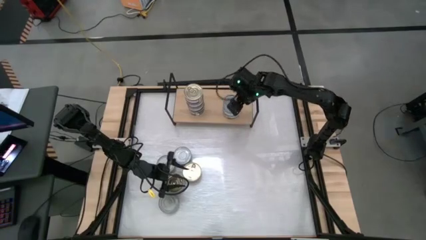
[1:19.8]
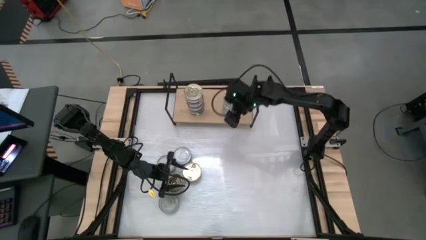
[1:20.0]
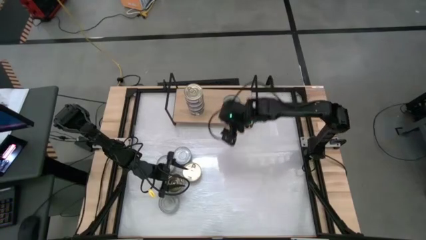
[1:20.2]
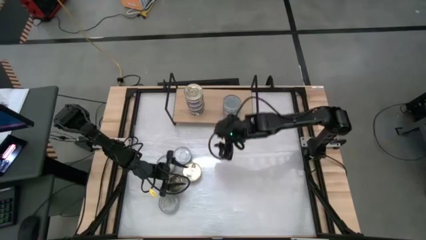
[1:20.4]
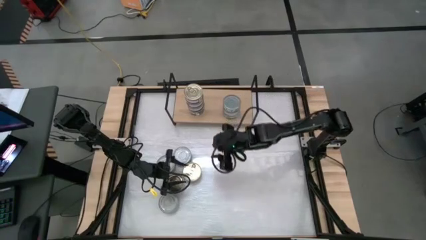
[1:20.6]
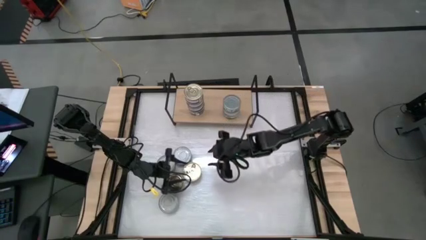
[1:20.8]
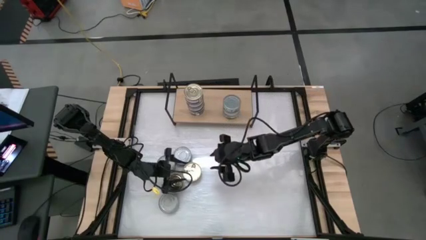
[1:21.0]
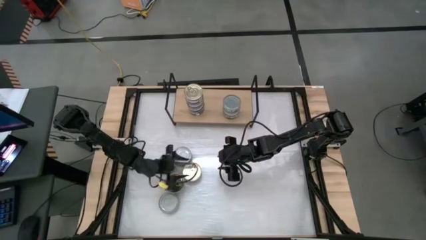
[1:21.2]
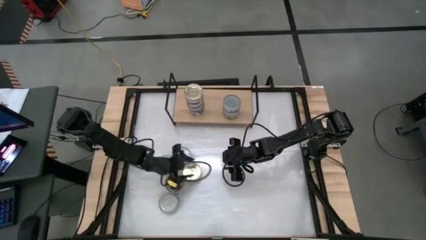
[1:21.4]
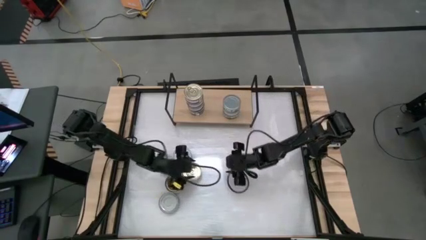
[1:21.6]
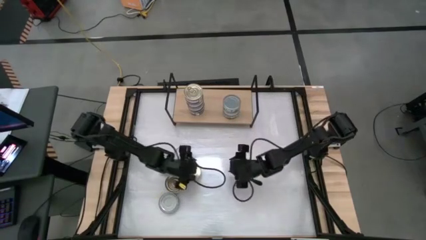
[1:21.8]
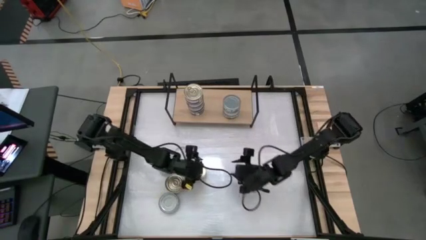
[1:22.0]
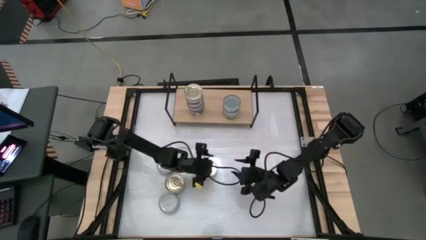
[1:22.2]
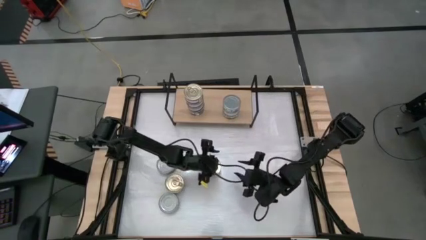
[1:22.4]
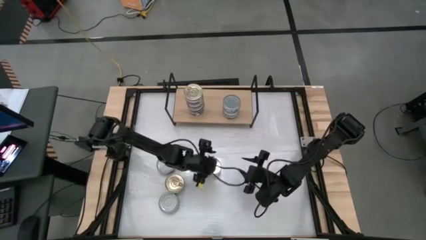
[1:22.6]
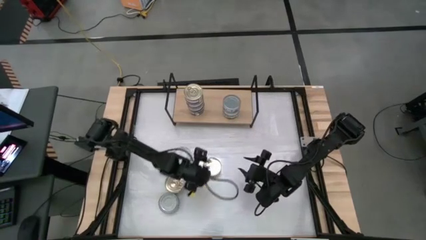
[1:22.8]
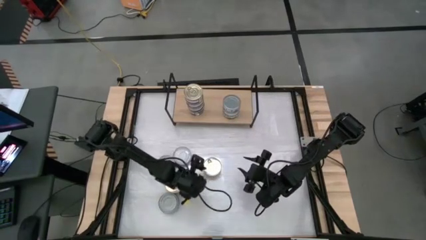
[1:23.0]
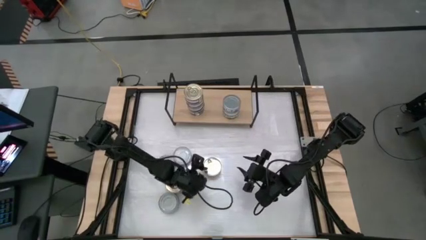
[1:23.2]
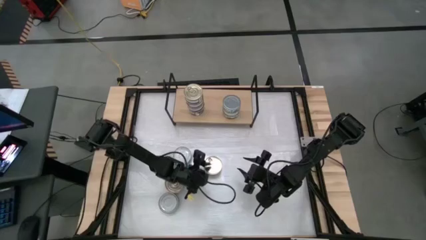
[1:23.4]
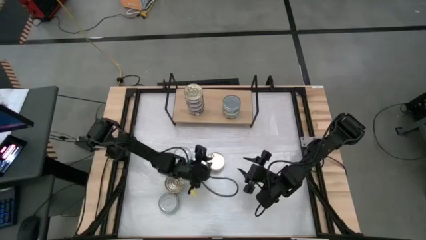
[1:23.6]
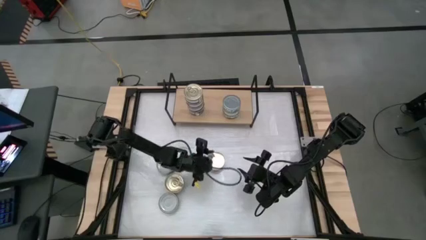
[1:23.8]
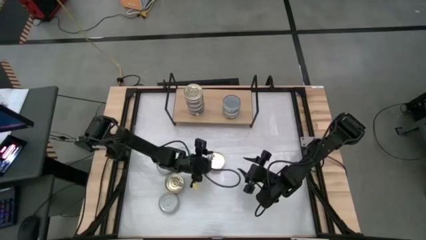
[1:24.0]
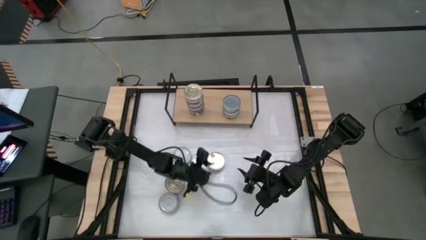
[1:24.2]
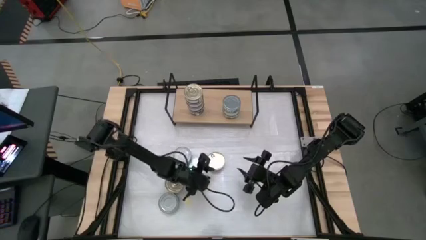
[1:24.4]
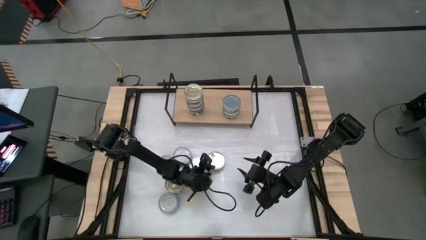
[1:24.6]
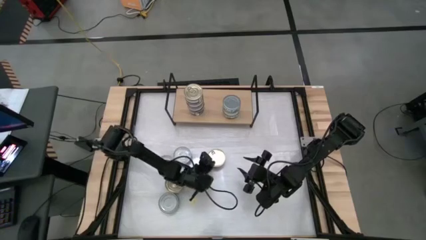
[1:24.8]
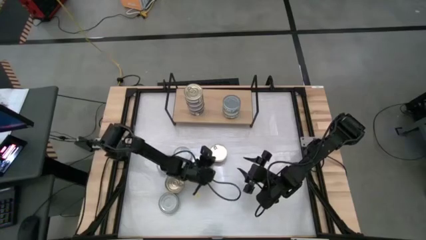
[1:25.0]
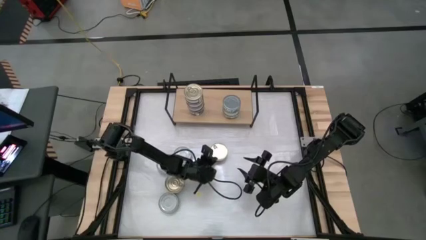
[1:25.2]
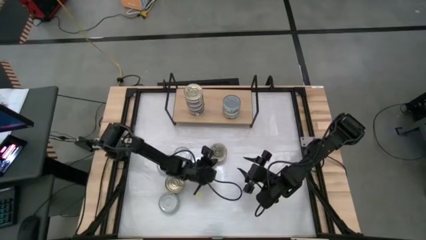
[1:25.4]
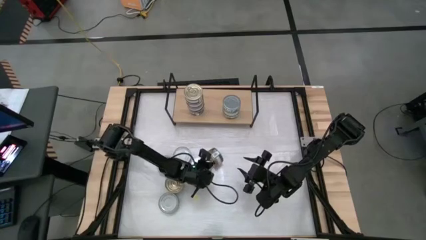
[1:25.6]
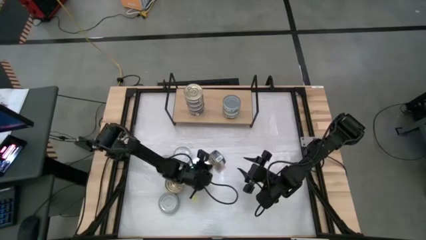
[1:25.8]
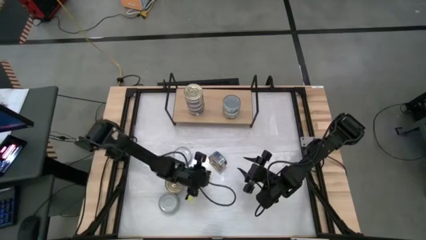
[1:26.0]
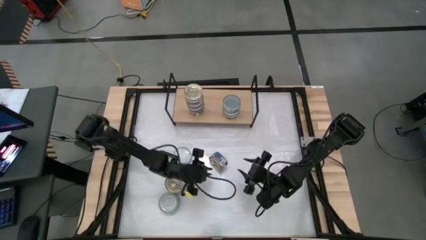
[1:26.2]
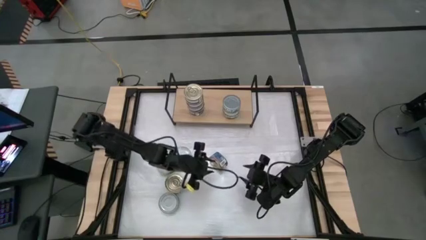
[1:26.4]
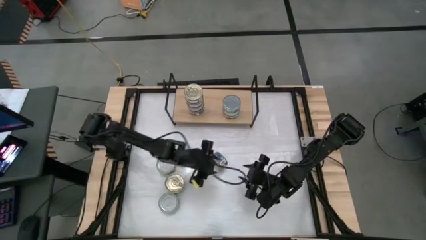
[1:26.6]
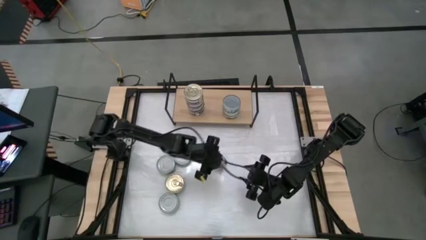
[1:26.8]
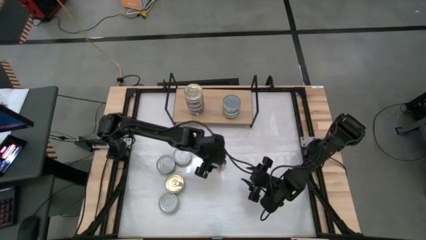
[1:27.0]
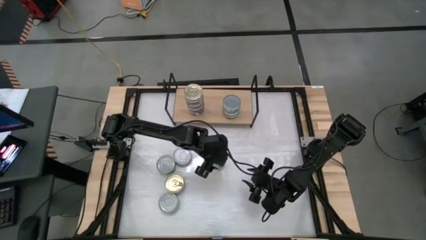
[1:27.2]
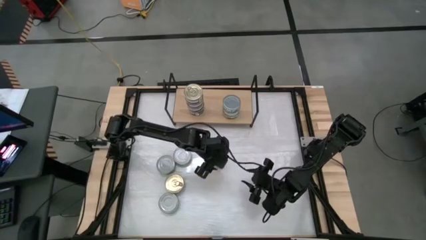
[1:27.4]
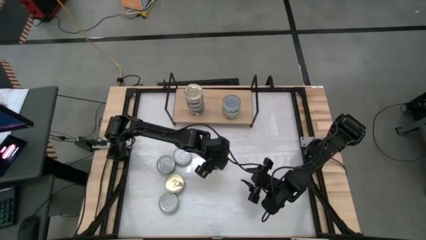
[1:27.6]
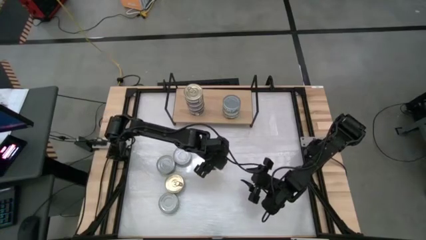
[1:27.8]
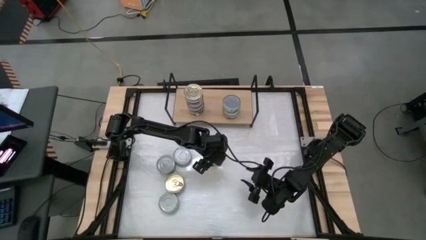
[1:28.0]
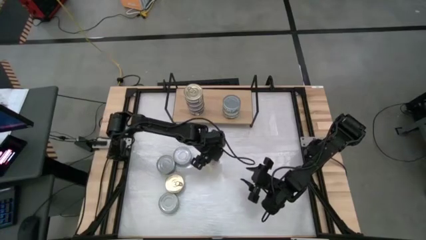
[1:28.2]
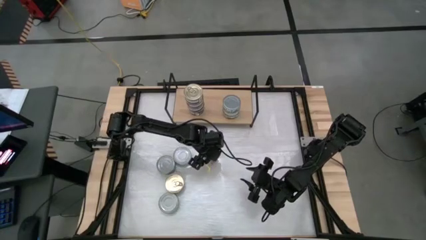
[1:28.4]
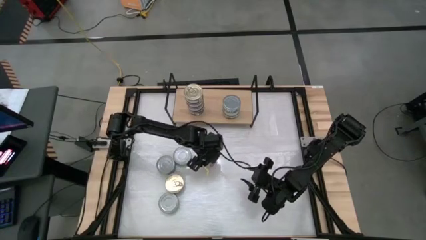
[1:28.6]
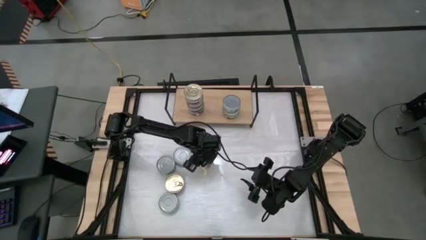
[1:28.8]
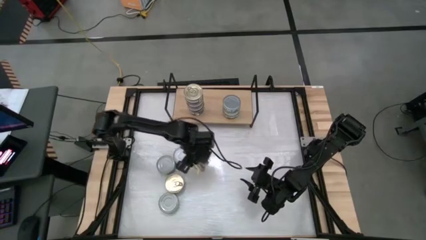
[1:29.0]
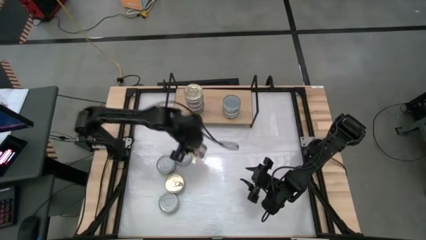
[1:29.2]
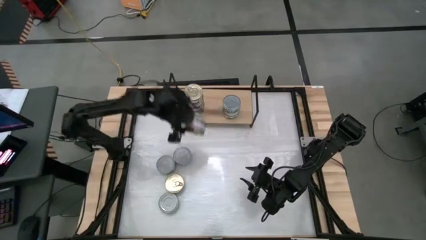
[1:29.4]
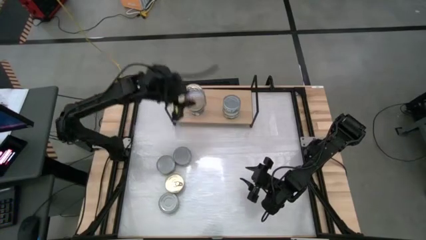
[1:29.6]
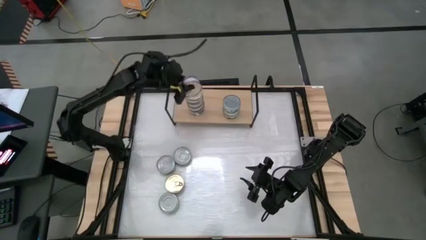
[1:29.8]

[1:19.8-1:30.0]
Task: Stack canned seafood by type on shelf
Stack the blue-pink tuna can on top of the other blue-pink tuna can on the shelf

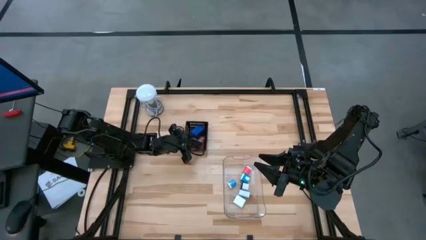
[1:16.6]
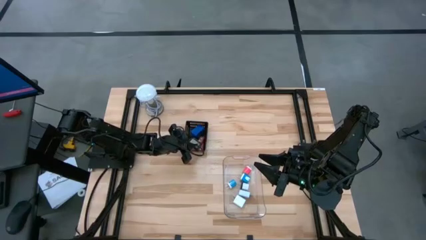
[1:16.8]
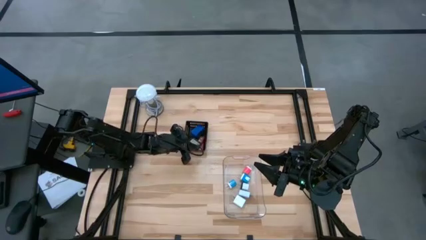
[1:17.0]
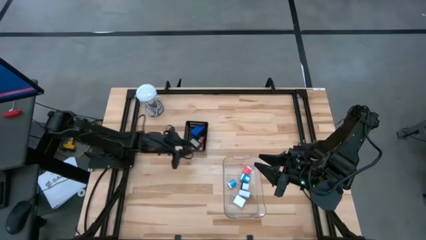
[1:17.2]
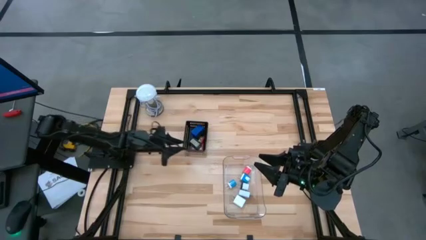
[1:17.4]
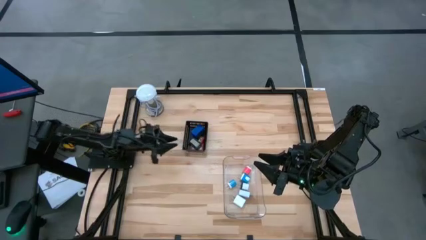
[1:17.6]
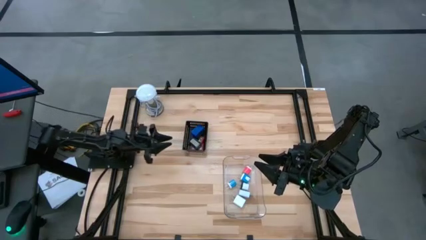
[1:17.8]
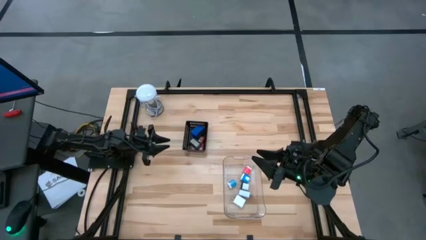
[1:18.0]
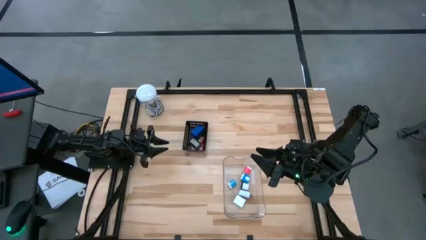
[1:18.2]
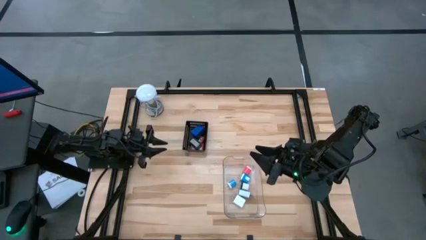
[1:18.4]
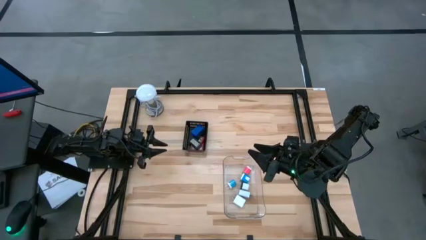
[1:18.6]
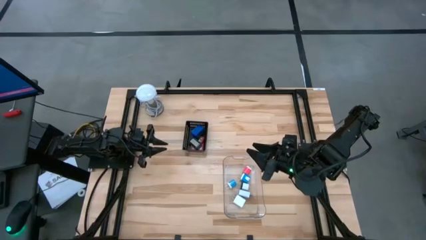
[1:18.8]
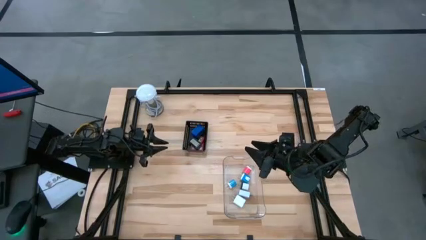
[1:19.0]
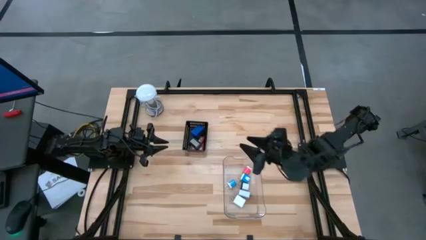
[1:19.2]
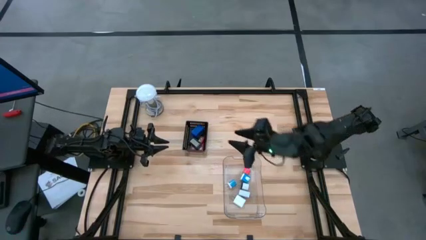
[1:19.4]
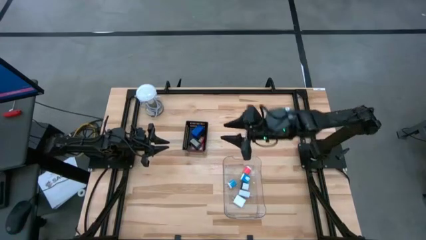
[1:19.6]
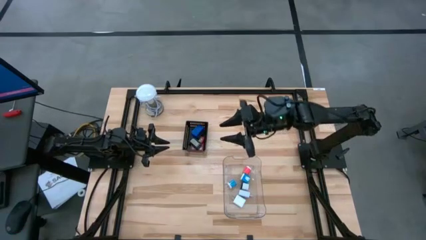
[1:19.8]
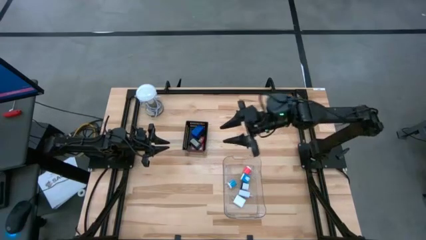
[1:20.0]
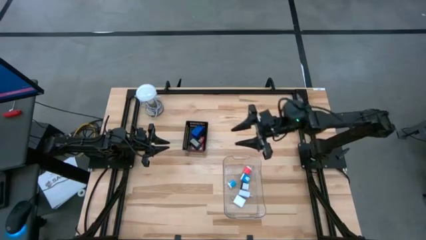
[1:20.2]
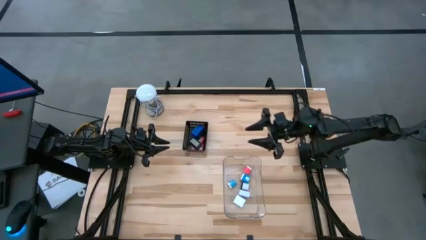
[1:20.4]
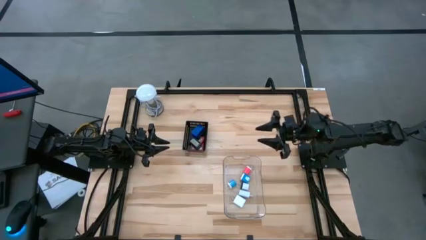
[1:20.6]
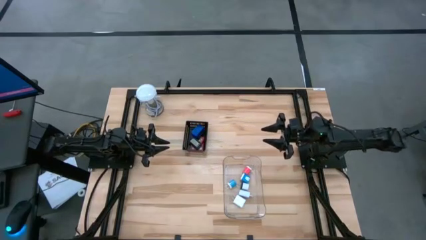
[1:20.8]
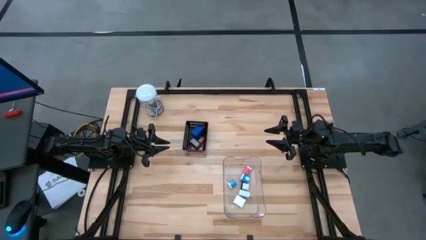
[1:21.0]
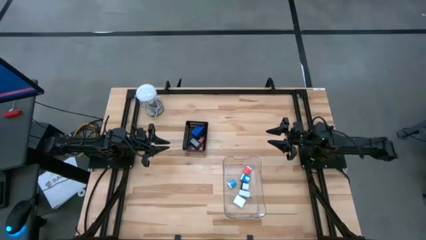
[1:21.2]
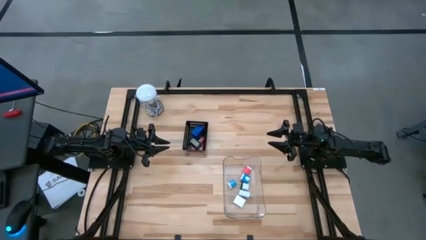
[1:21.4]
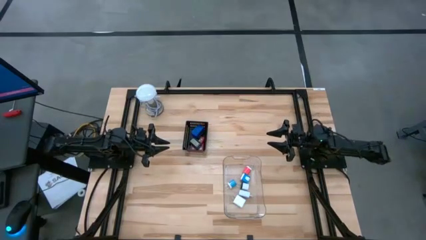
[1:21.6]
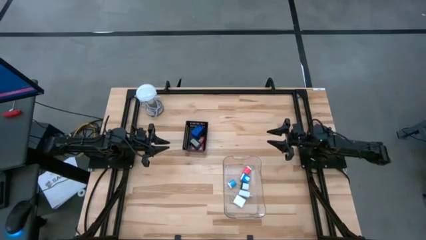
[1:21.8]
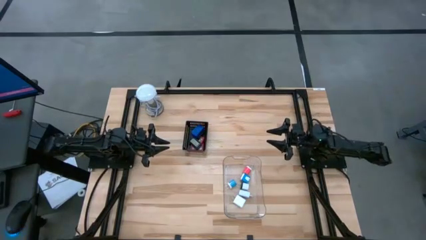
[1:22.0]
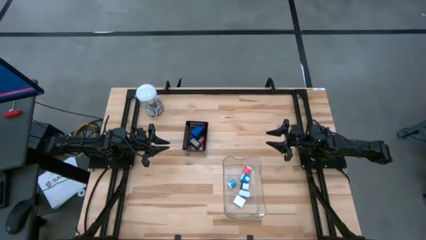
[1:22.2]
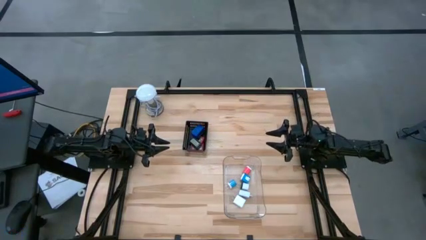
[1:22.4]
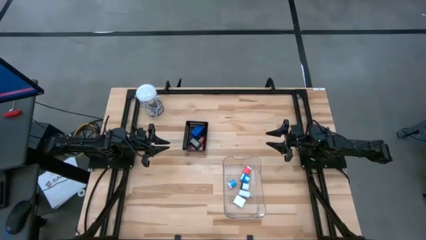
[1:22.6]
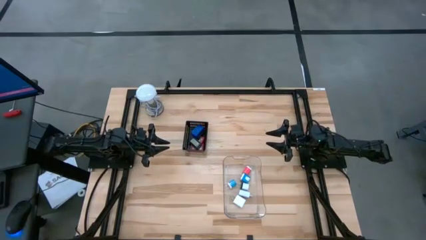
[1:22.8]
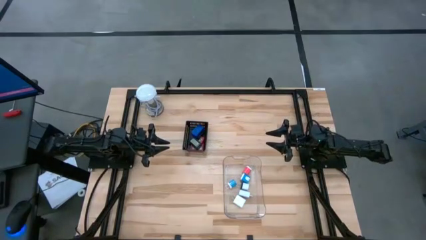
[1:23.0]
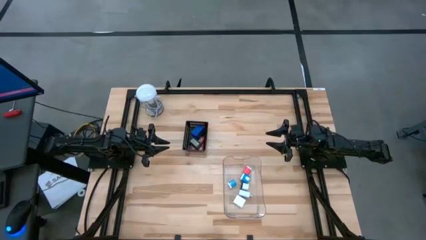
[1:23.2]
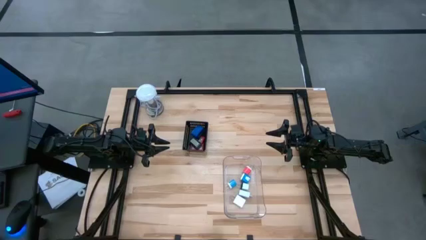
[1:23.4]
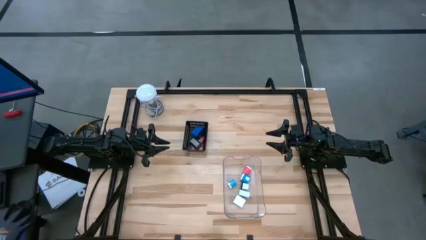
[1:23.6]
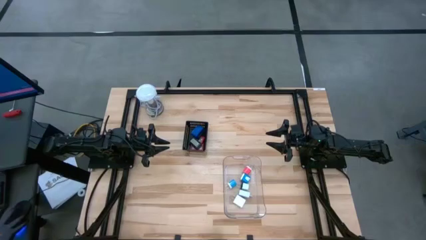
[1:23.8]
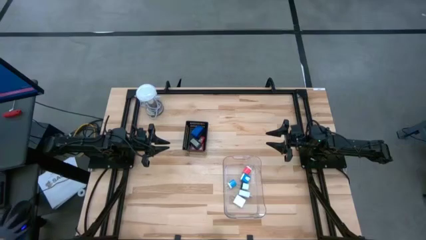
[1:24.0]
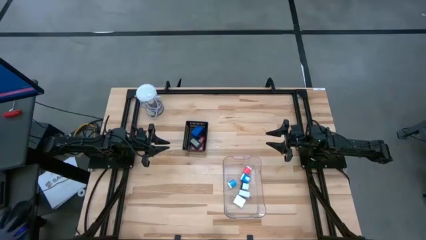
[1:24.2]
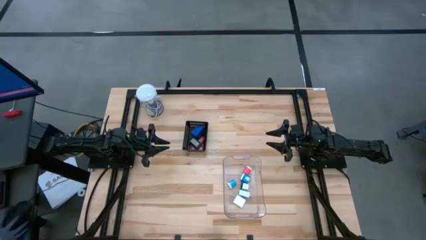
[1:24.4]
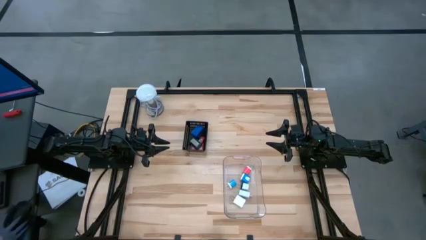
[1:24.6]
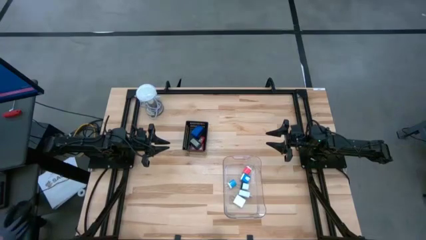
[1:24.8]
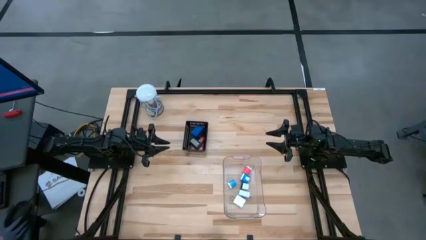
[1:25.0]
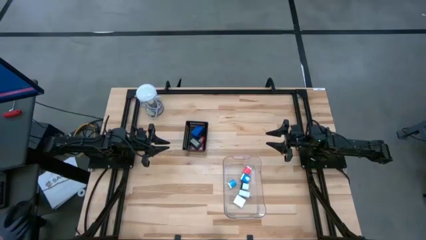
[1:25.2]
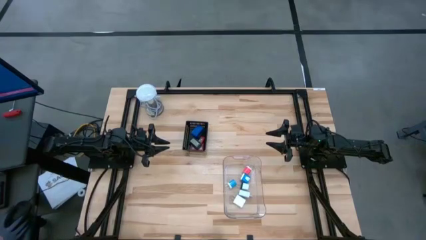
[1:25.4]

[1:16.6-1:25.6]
Task: Pick & Place Office items
Return to Home Position
